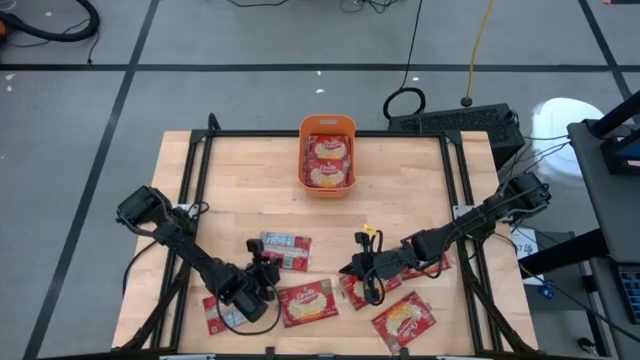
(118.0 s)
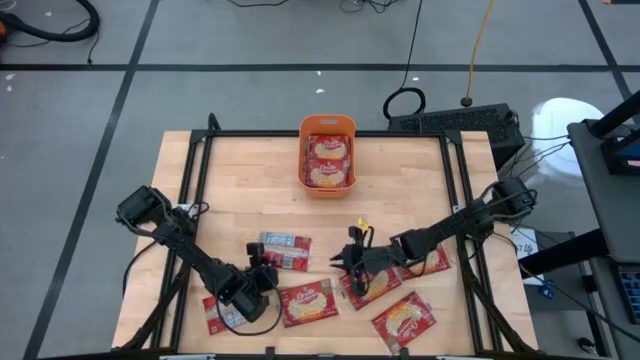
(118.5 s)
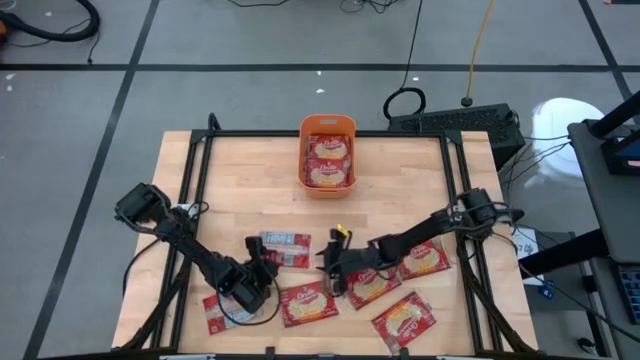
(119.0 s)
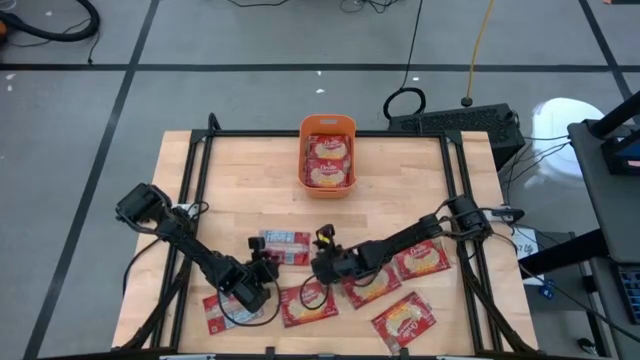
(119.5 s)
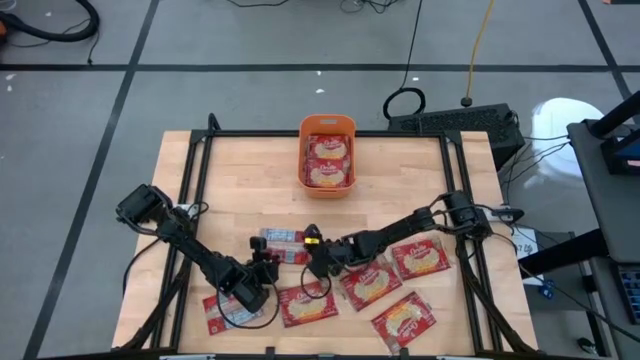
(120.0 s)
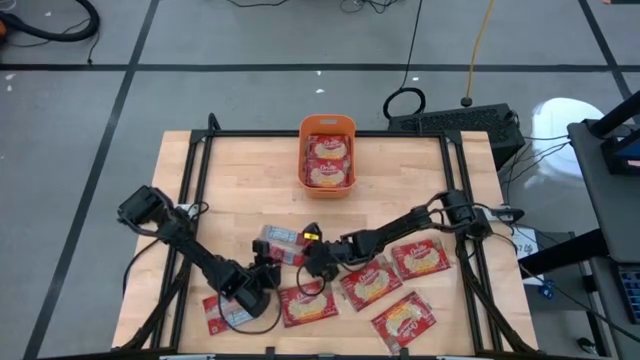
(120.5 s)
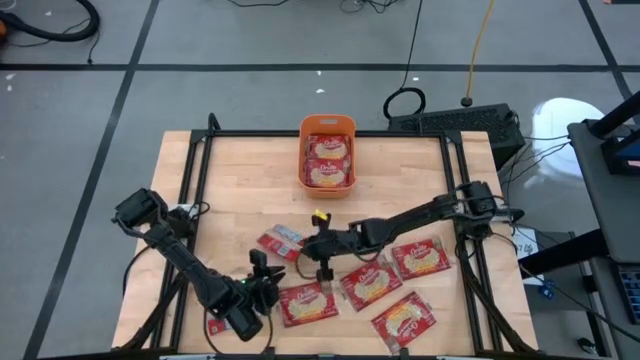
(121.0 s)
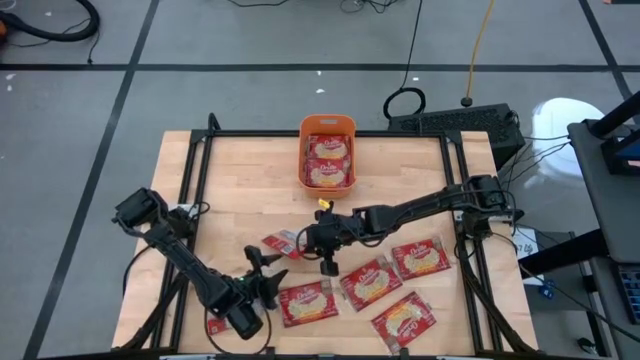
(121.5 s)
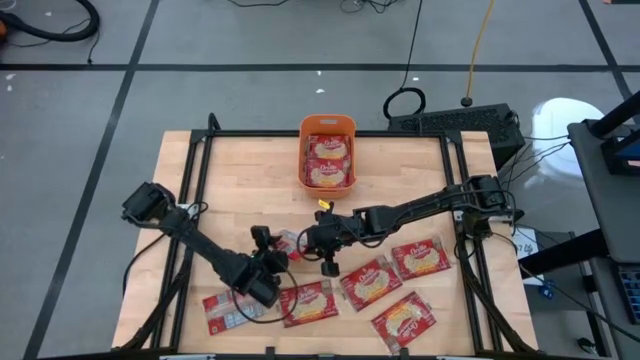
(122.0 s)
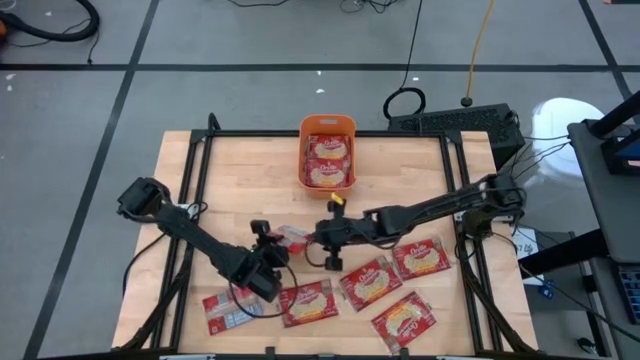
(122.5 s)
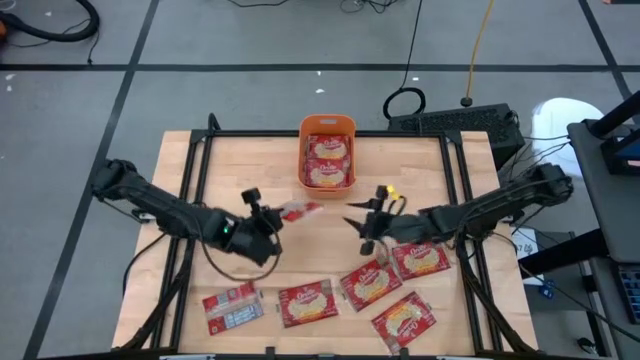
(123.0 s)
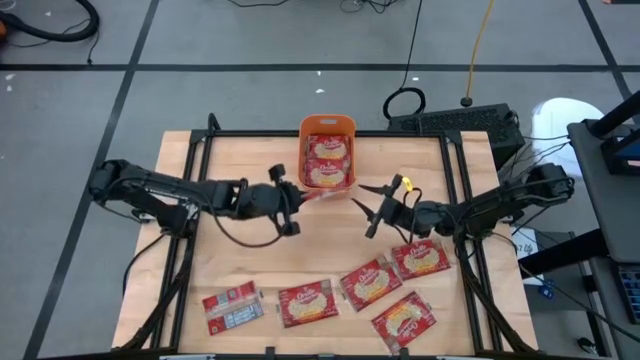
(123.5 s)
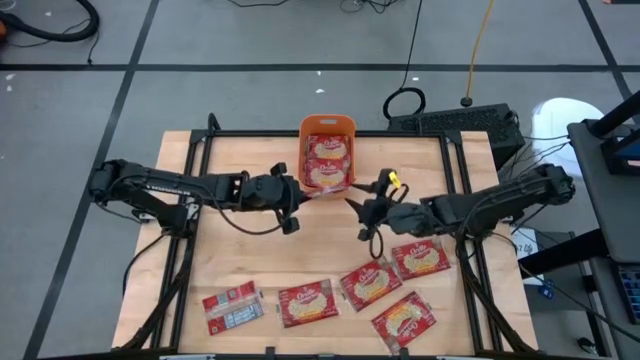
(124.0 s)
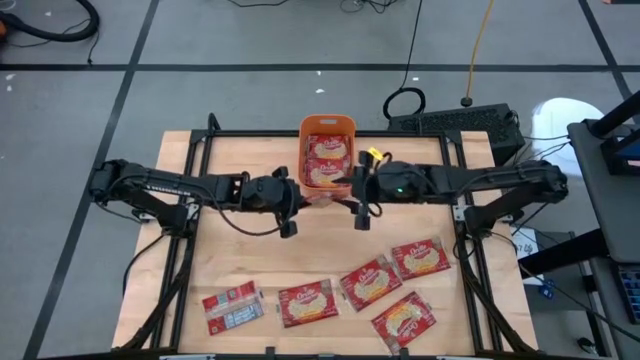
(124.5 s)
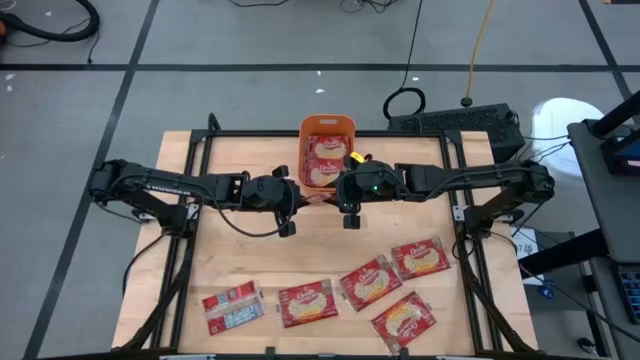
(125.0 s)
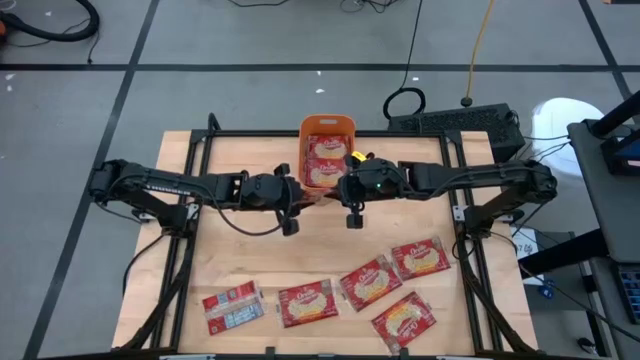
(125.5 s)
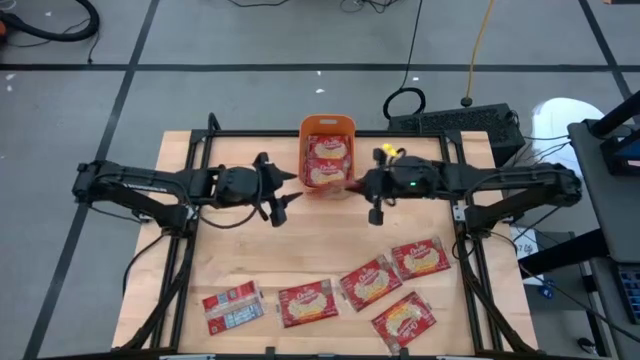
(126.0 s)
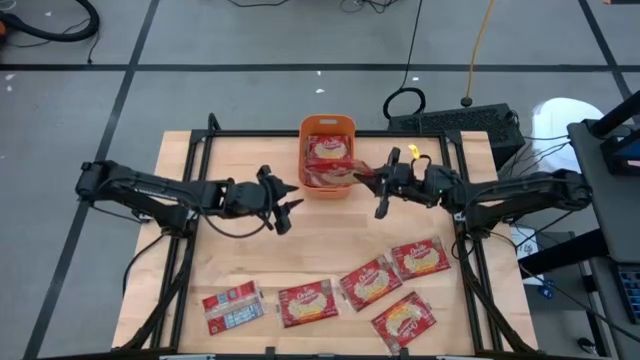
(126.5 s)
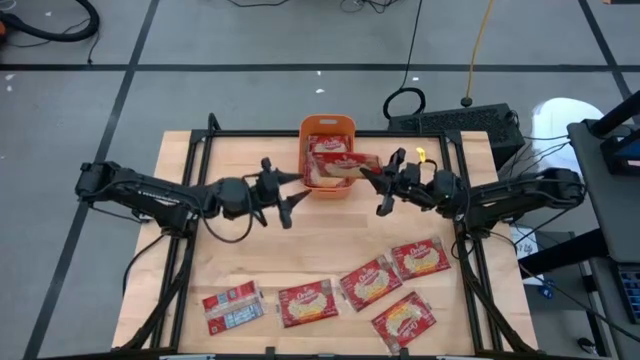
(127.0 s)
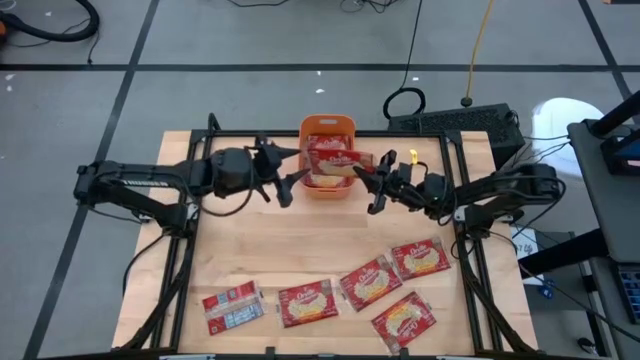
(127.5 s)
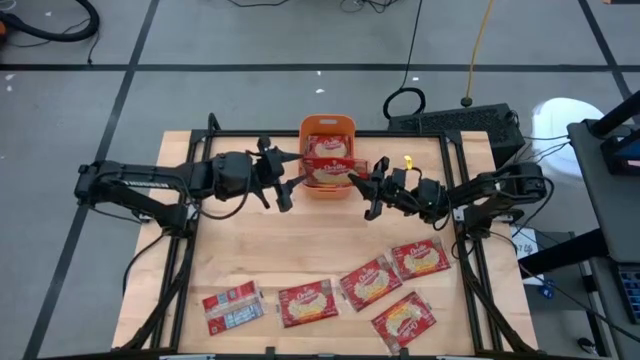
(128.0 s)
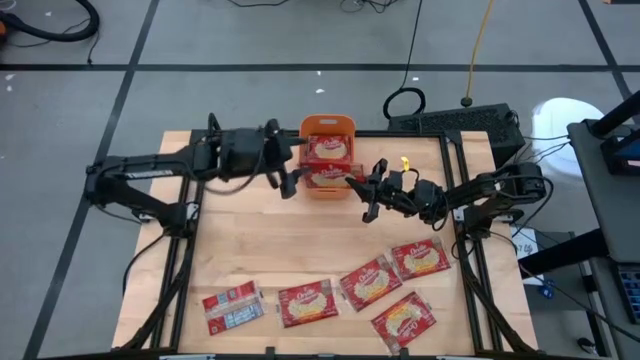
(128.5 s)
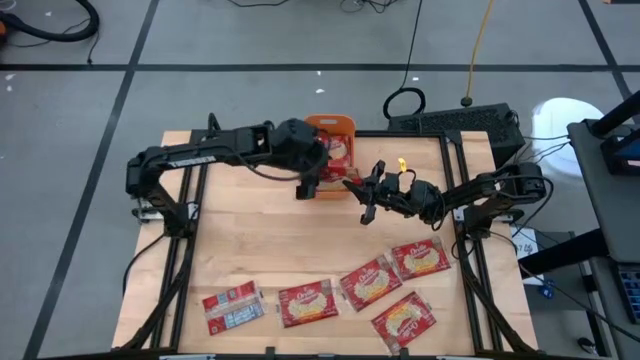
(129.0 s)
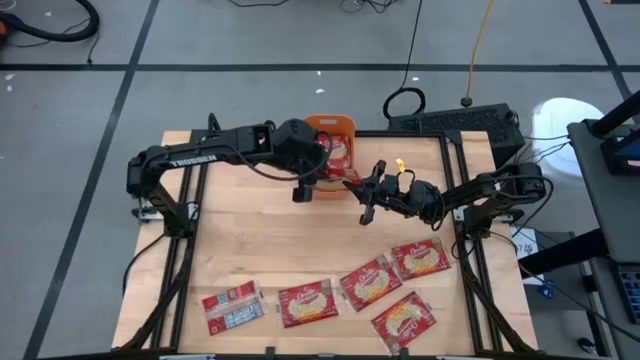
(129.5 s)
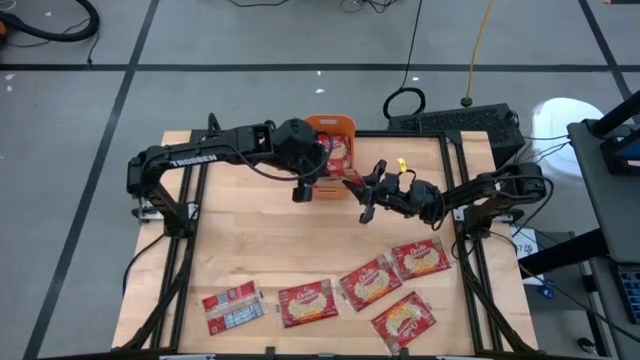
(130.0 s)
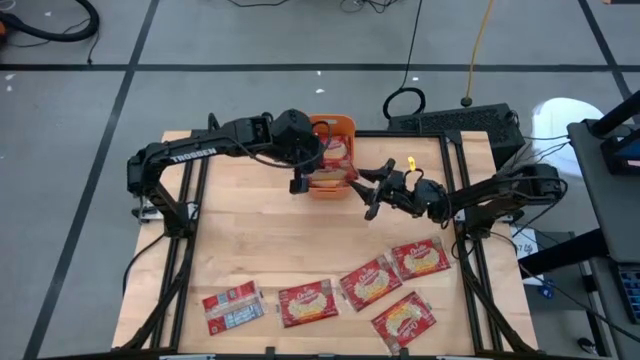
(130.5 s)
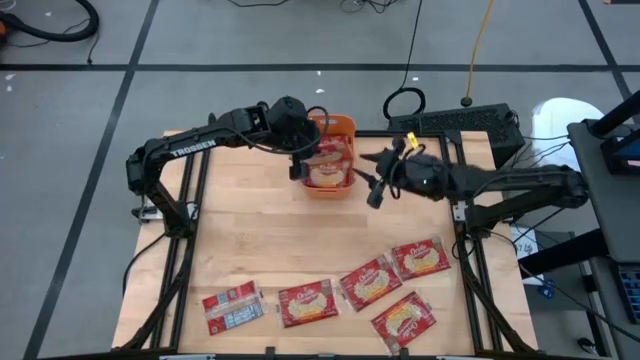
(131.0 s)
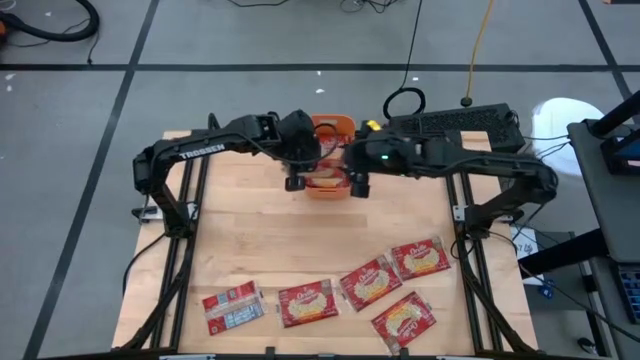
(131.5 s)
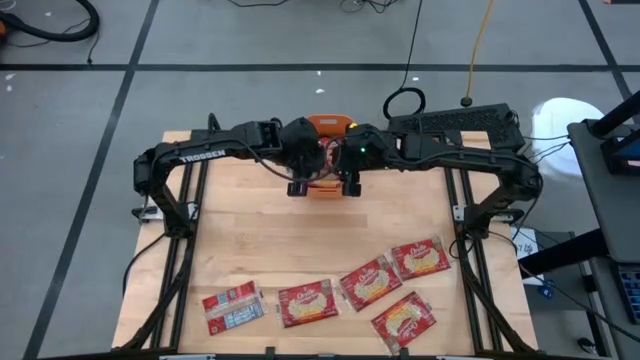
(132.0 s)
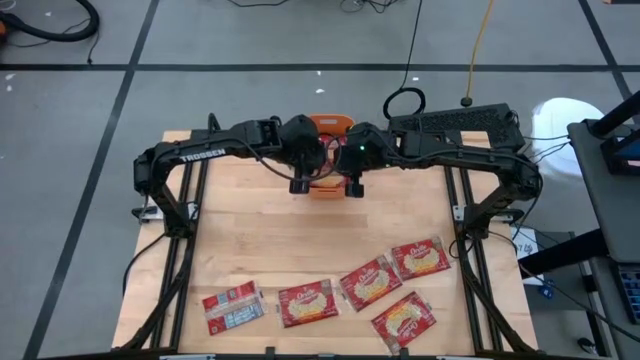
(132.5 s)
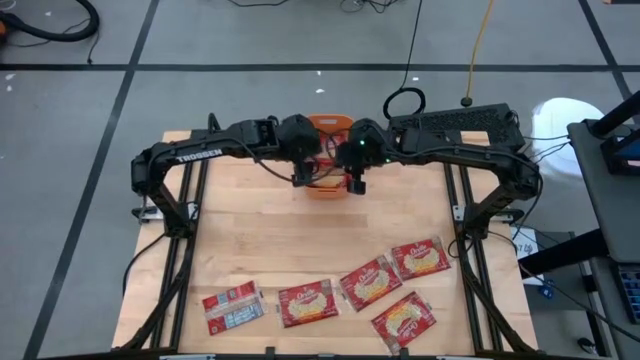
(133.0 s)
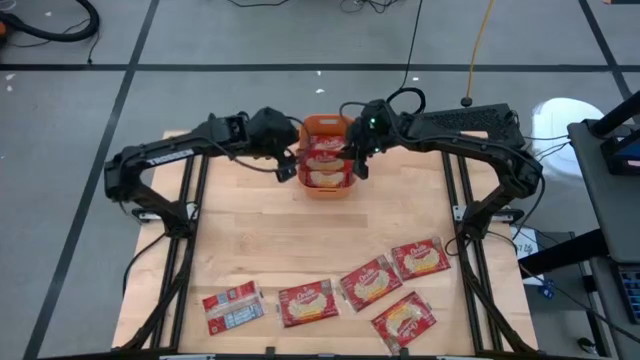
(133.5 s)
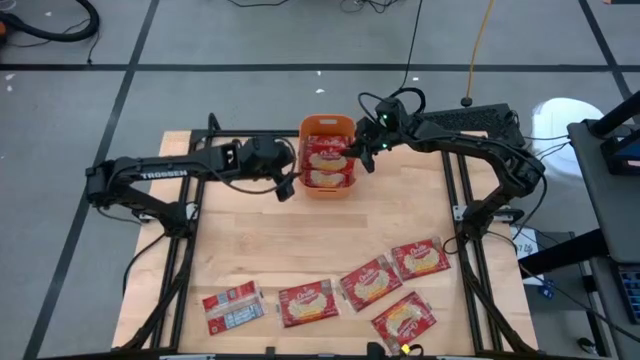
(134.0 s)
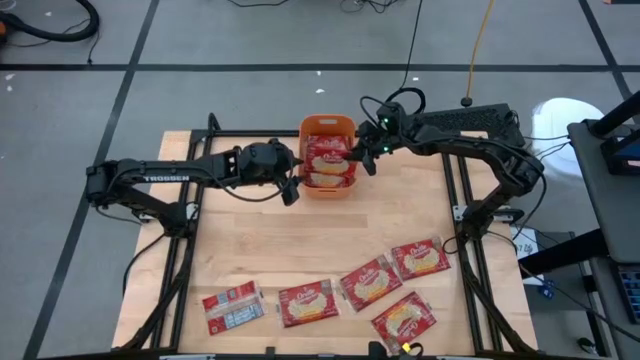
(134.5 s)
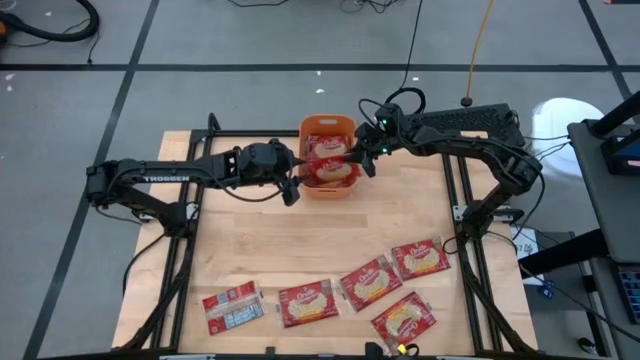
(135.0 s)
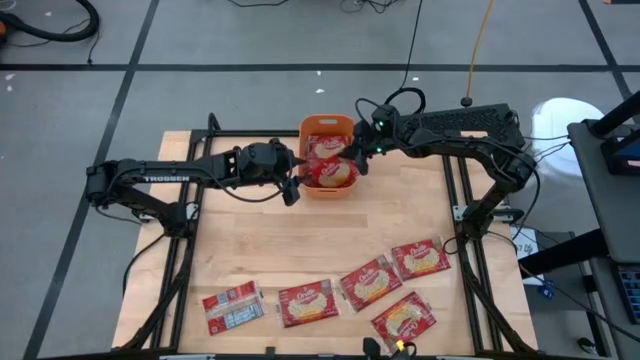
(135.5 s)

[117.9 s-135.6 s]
Task: Sort popcorn bags into baskets
Put the red popcorn bag into the orange bin

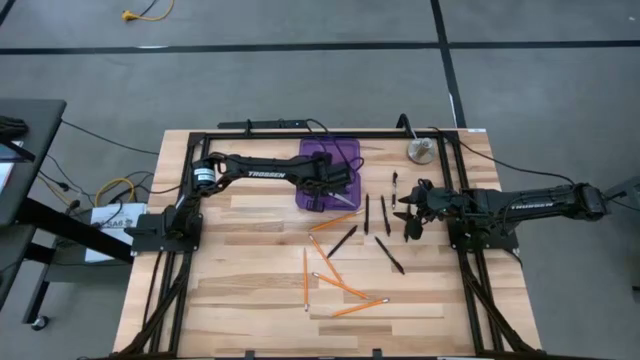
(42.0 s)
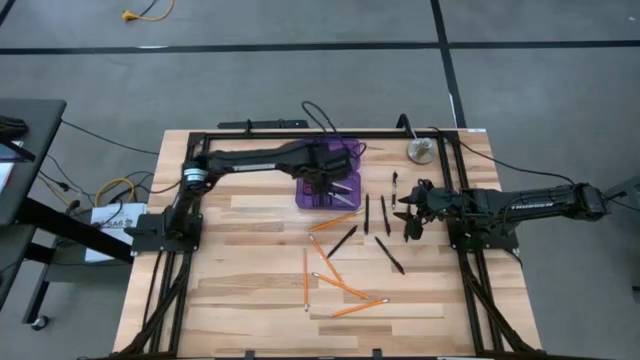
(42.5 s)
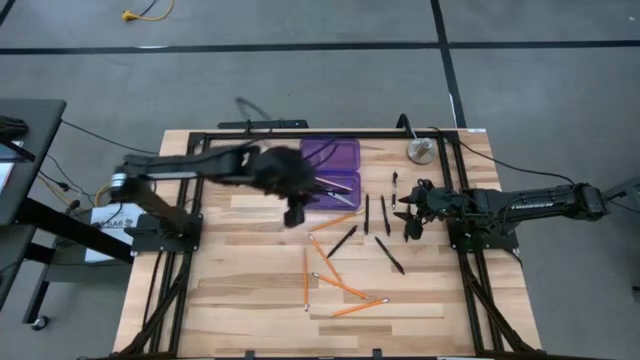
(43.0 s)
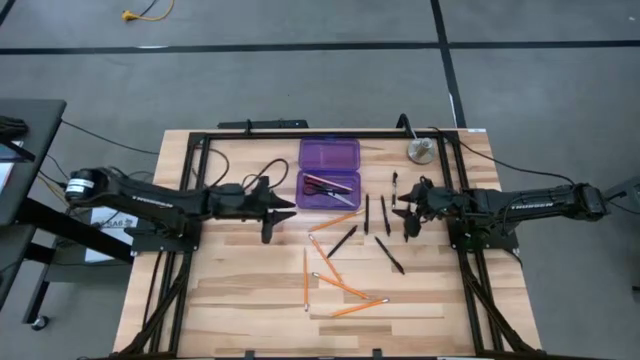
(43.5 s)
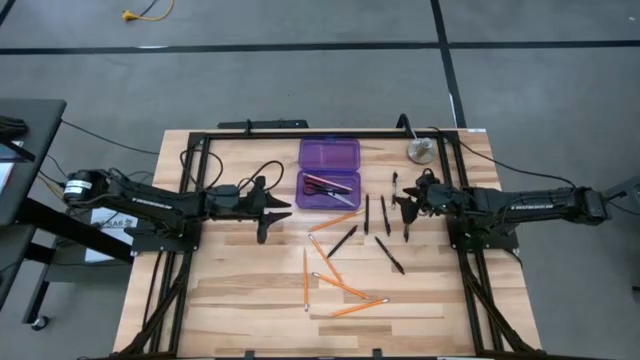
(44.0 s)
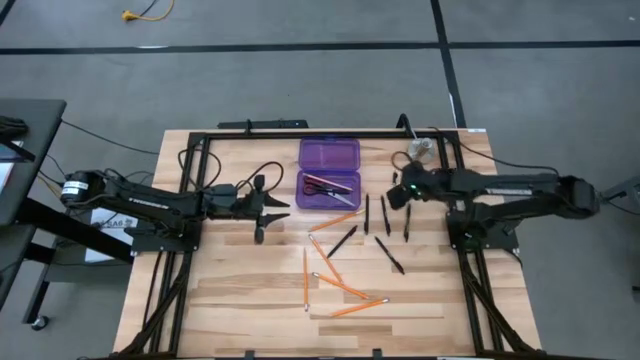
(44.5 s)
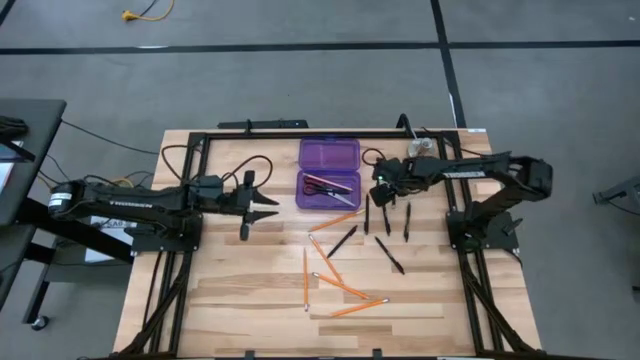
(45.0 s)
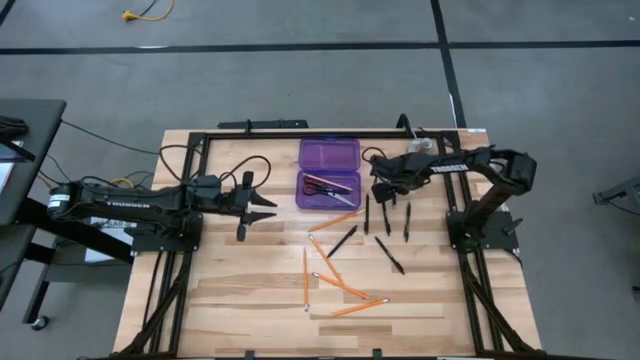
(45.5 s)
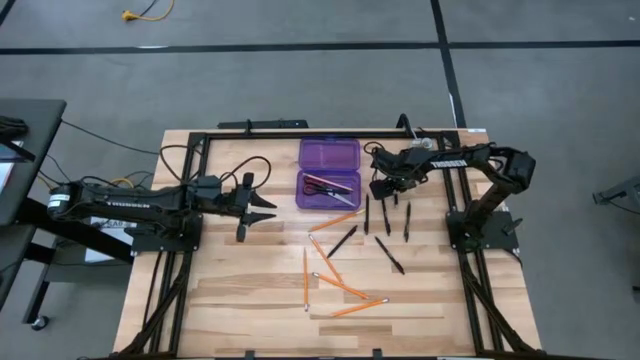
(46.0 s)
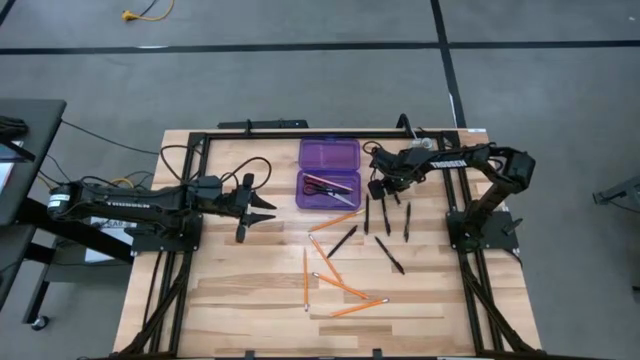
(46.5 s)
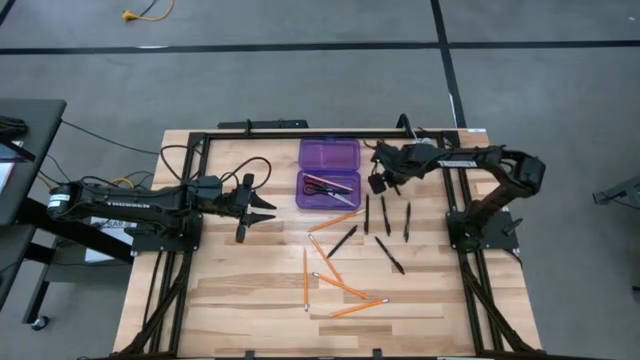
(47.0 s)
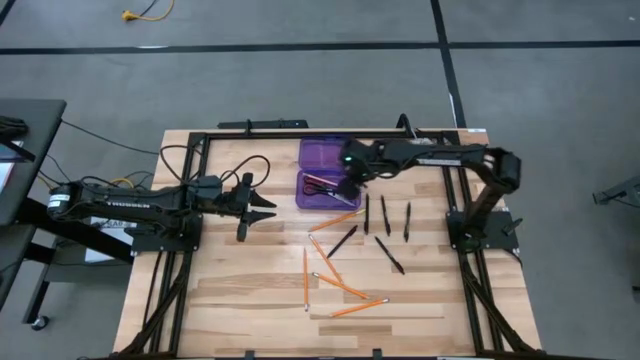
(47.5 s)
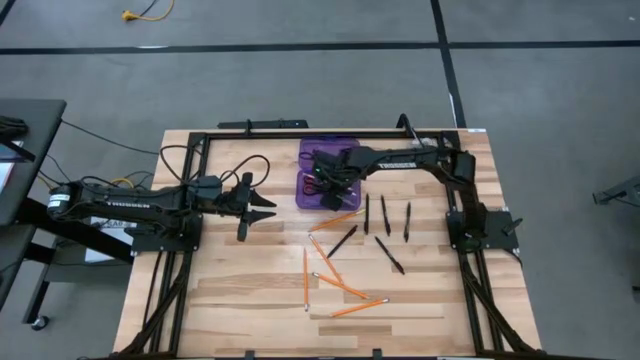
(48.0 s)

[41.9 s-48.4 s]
Task: Pick & place school supplies into a supply box
Put the transparent pen into the violet supply box
